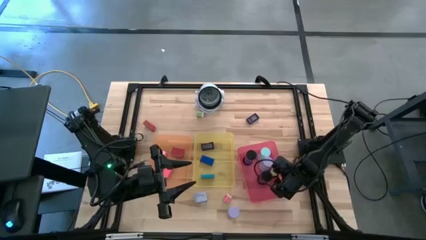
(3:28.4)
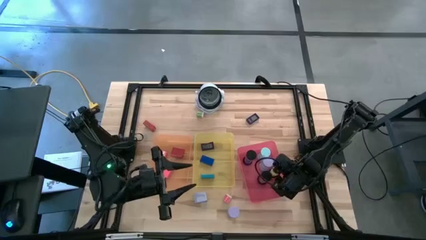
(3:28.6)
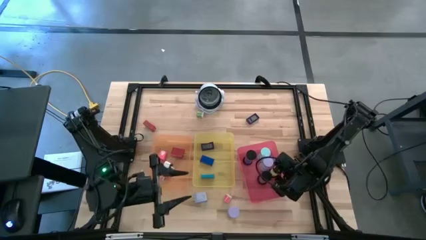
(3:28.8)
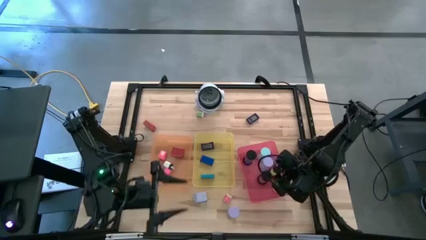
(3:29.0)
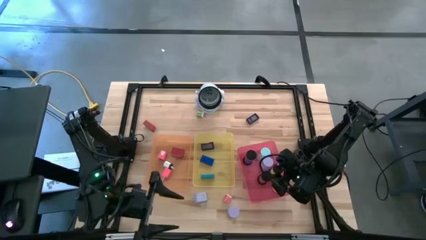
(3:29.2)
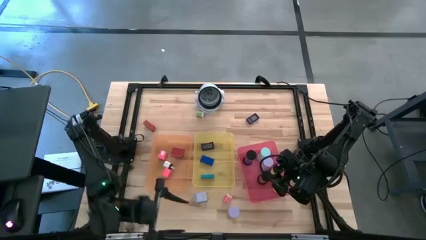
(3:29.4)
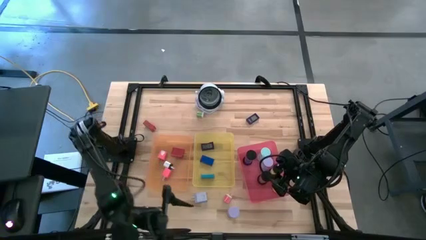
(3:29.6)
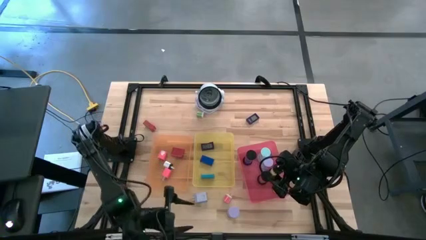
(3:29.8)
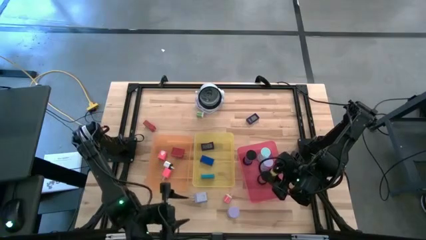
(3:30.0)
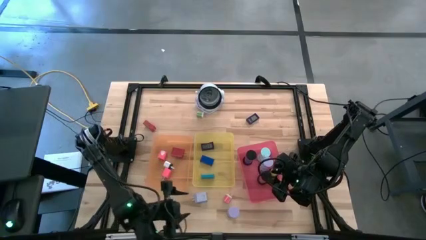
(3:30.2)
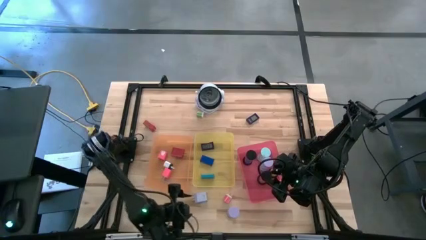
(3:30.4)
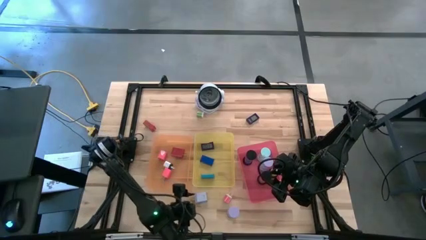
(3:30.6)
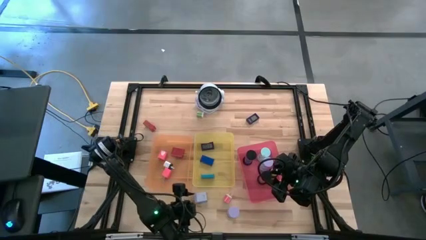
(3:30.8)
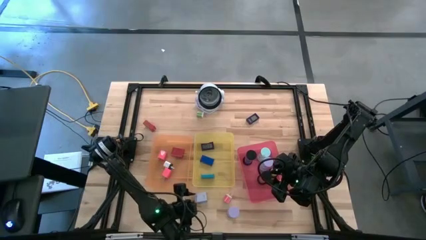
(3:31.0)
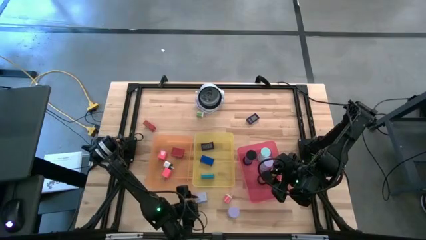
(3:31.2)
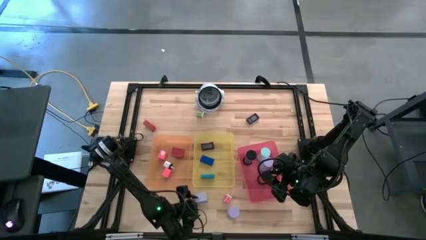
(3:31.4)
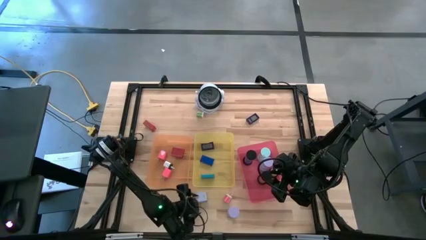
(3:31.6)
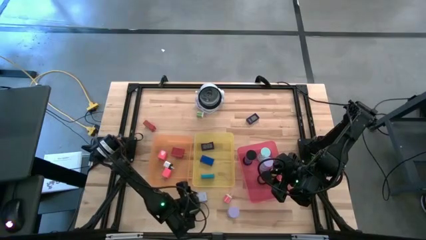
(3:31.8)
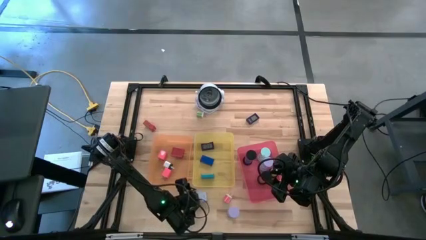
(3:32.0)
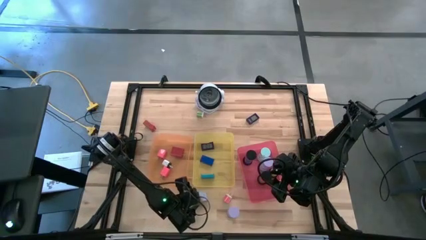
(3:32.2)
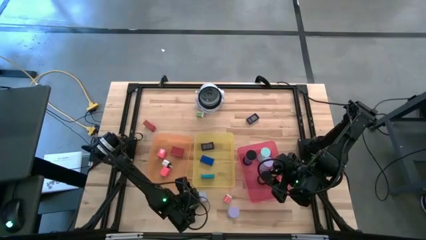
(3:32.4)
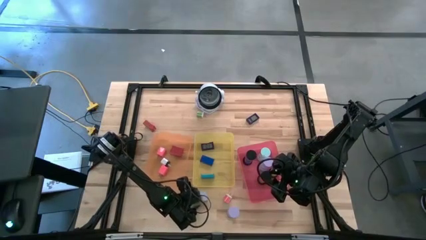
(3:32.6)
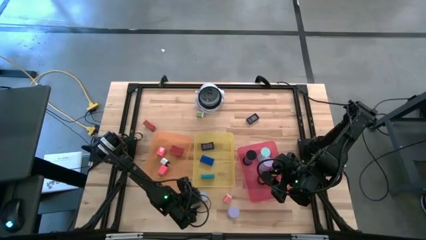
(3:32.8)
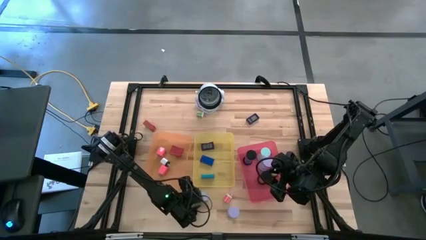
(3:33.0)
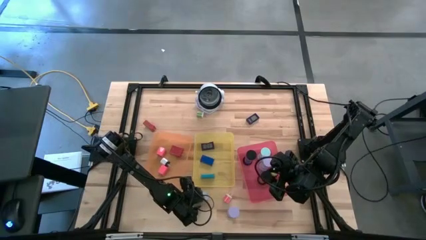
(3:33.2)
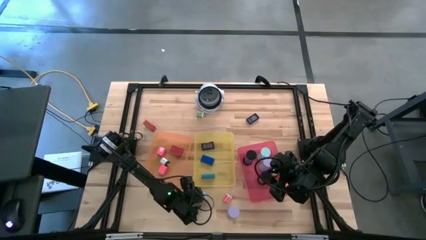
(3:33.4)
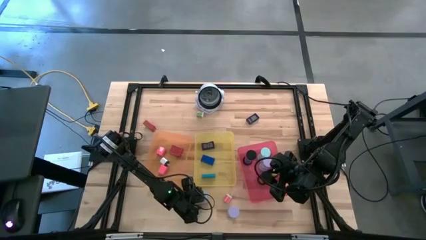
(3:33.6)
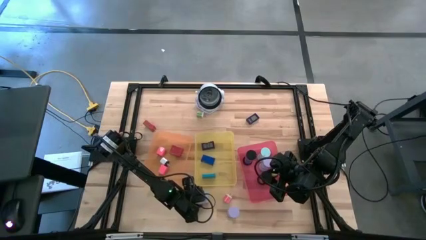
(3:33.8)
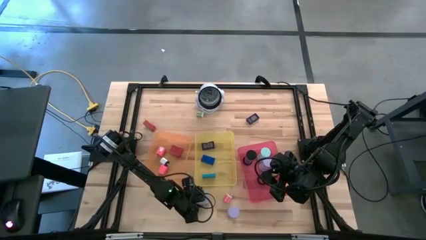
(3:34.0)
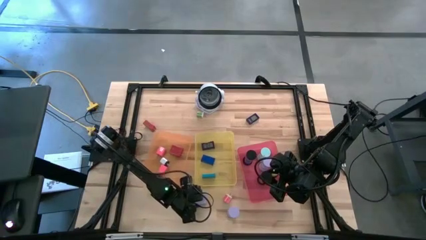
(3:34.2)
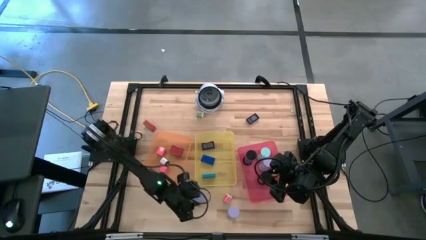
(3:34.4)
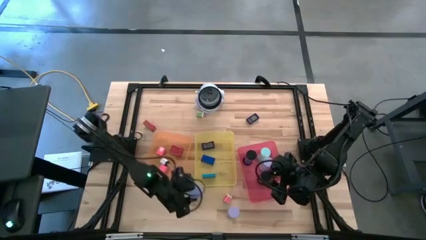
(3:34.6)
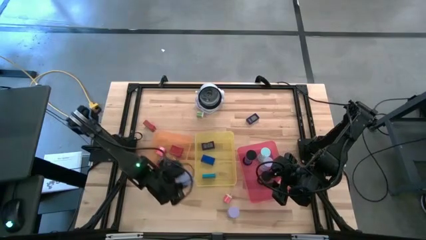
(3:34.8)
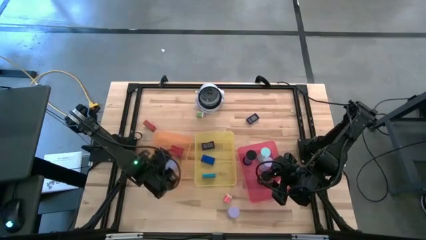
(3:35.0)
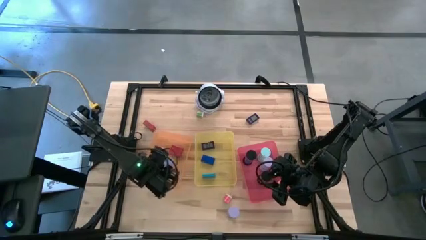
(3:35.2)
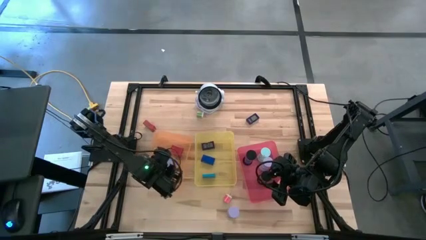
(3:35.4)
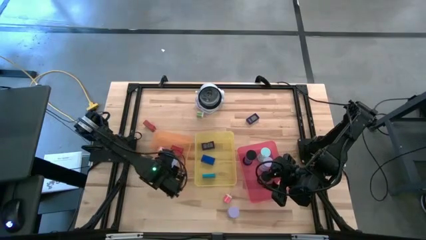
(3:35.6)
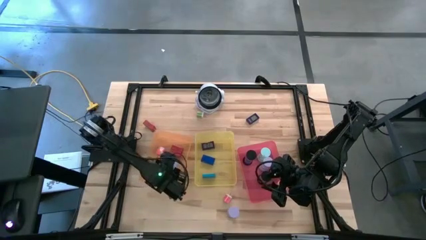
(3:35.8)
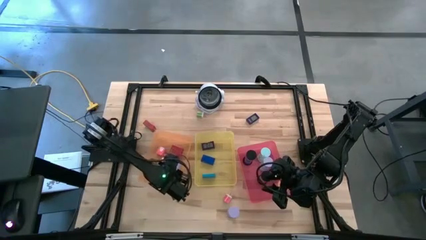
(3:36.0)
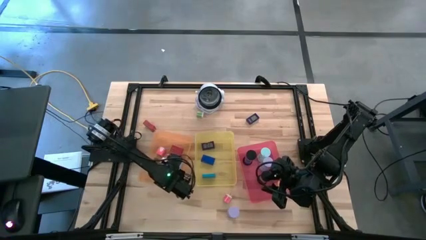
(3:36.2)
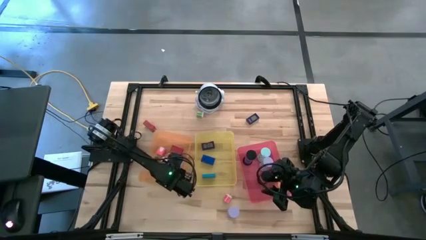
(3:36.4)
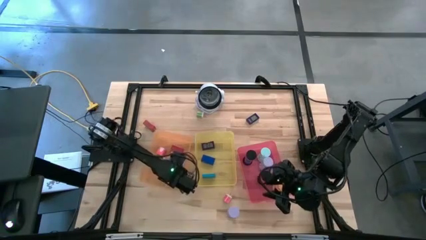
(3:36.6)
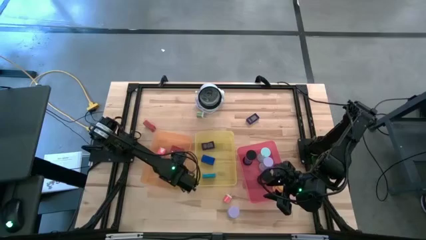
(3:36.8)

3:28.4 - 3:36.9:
Task: Pick & Place Office items
Put the white charger adaptor into the orange bin

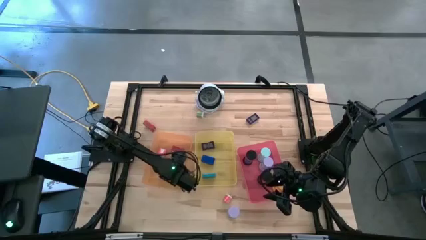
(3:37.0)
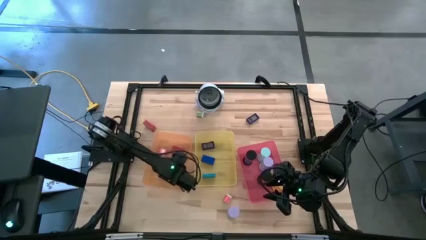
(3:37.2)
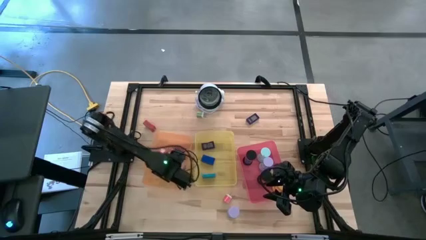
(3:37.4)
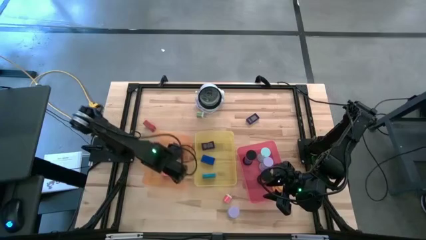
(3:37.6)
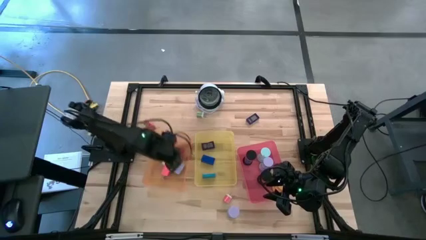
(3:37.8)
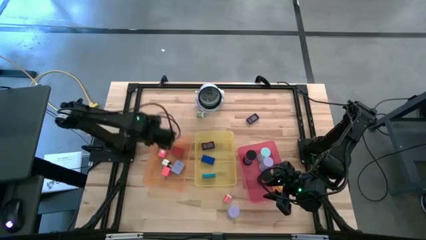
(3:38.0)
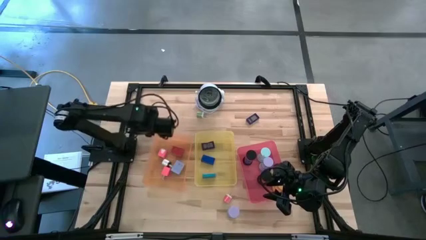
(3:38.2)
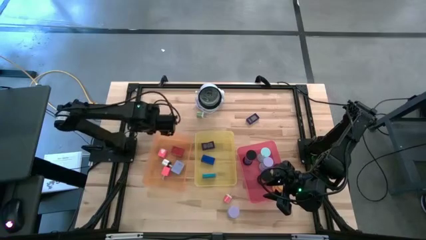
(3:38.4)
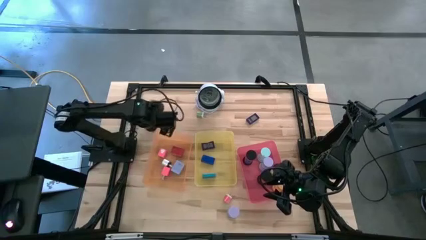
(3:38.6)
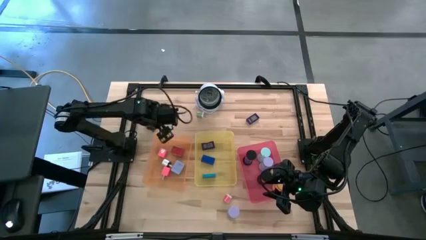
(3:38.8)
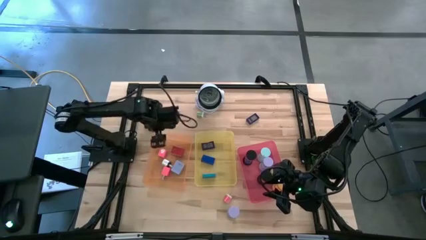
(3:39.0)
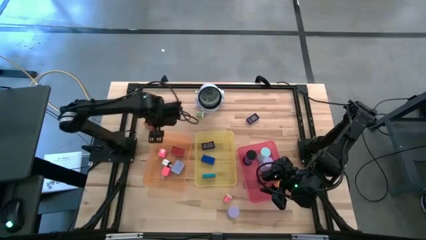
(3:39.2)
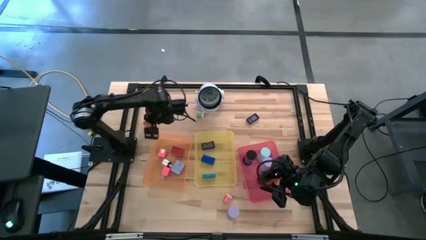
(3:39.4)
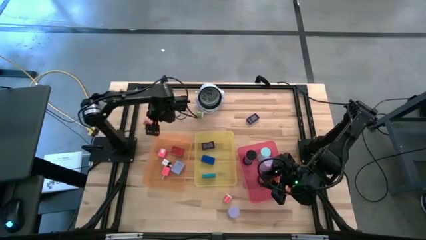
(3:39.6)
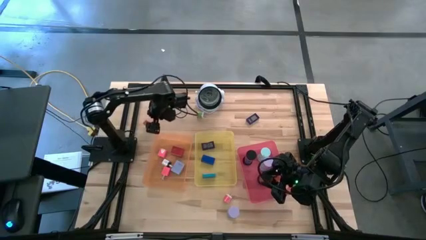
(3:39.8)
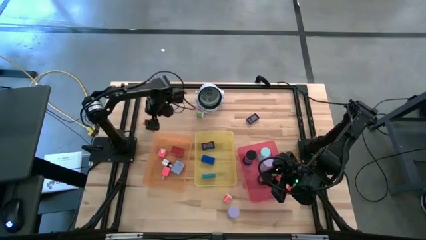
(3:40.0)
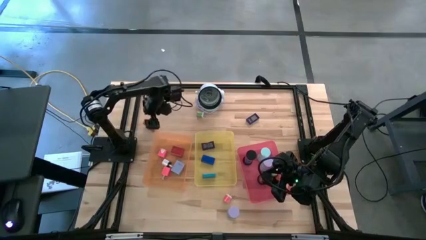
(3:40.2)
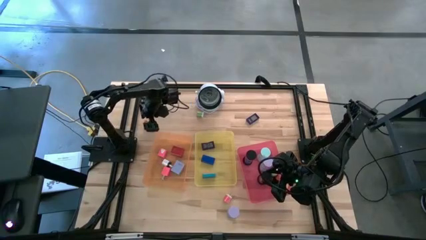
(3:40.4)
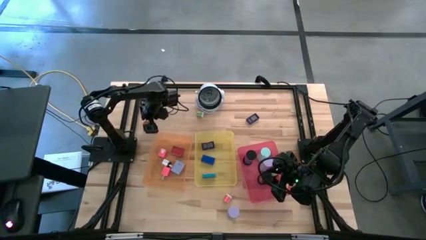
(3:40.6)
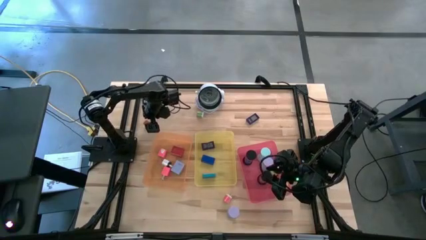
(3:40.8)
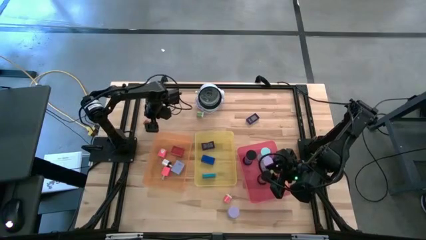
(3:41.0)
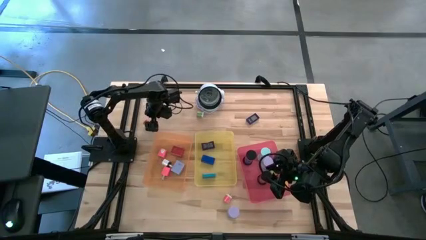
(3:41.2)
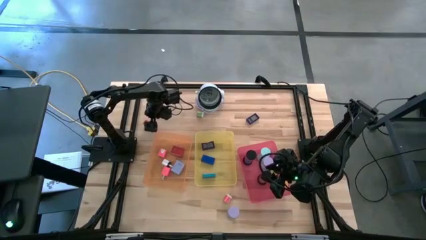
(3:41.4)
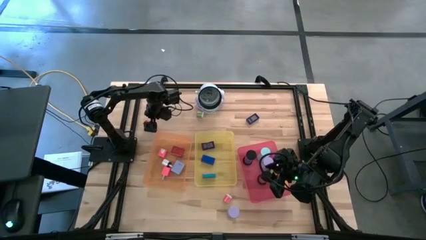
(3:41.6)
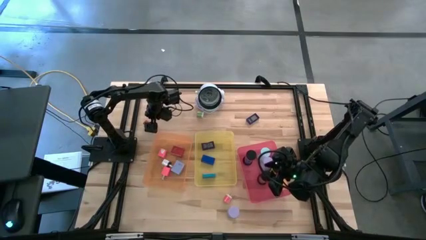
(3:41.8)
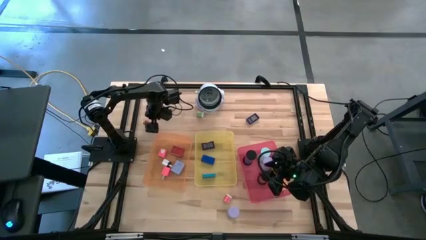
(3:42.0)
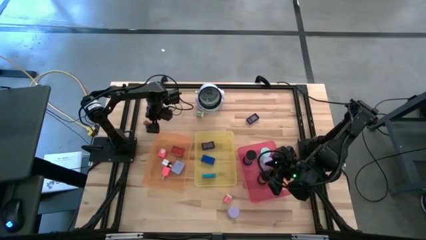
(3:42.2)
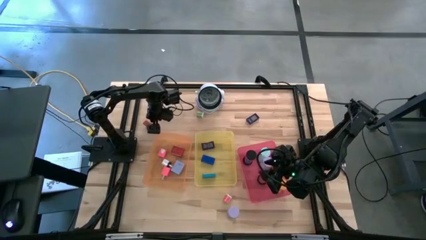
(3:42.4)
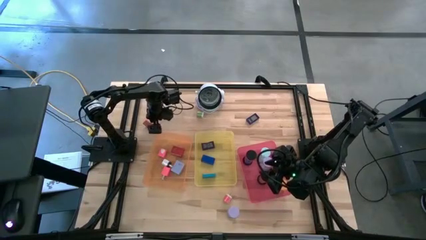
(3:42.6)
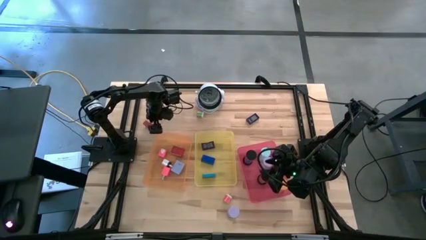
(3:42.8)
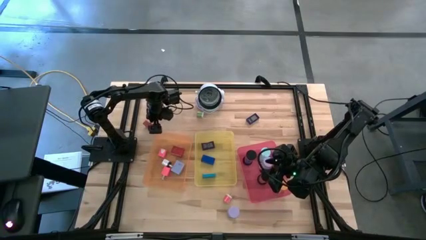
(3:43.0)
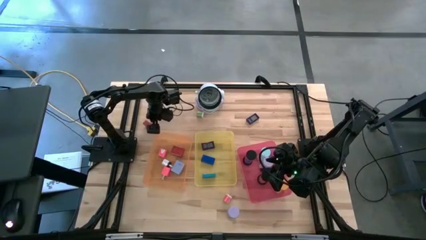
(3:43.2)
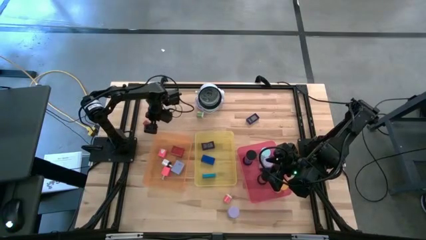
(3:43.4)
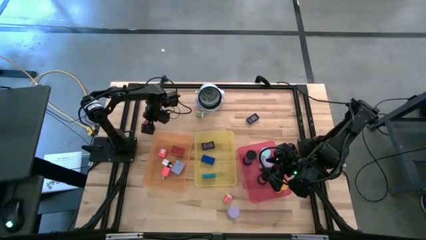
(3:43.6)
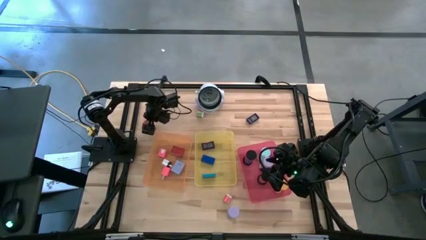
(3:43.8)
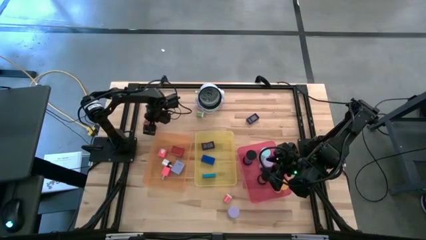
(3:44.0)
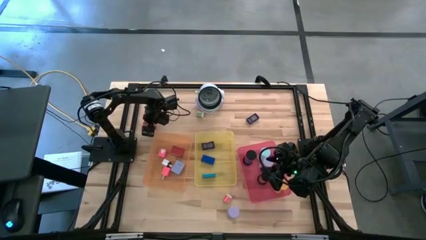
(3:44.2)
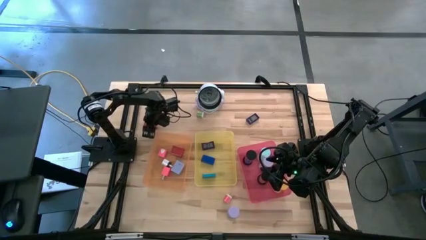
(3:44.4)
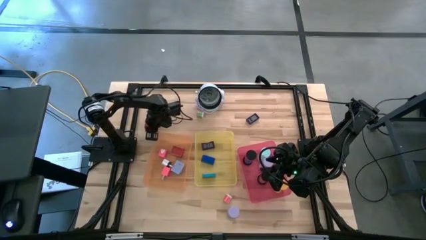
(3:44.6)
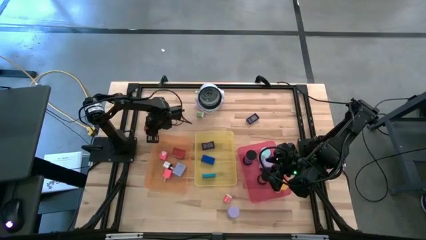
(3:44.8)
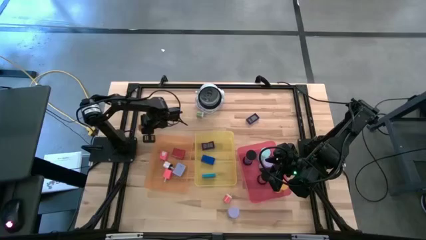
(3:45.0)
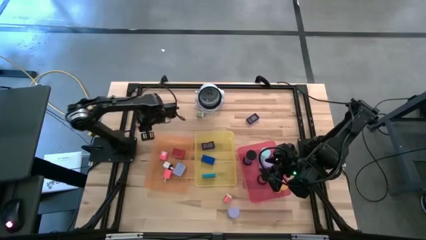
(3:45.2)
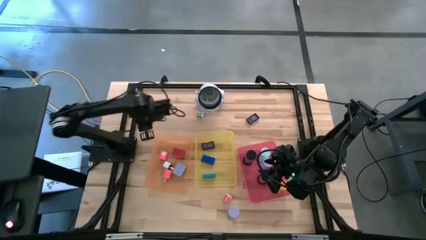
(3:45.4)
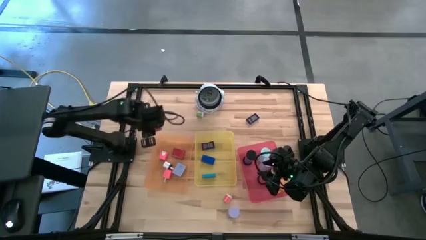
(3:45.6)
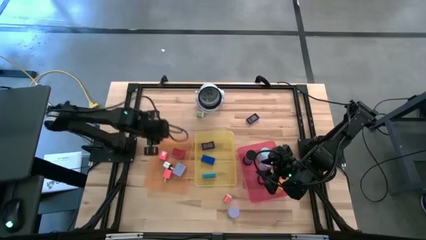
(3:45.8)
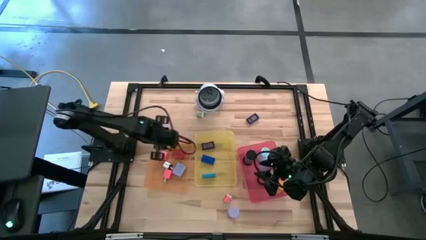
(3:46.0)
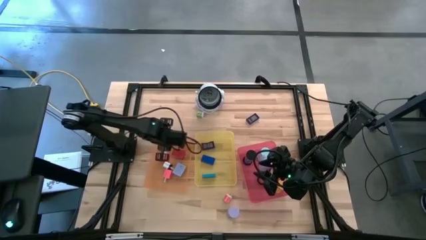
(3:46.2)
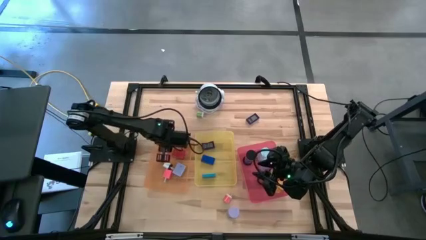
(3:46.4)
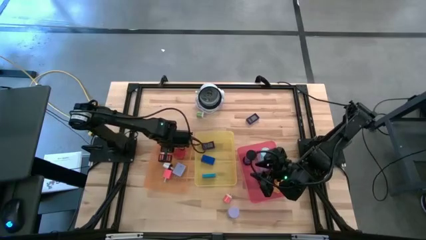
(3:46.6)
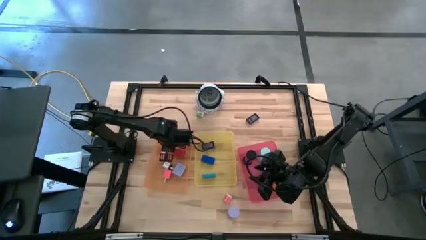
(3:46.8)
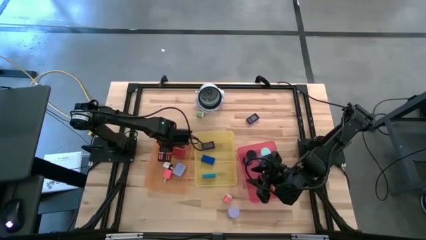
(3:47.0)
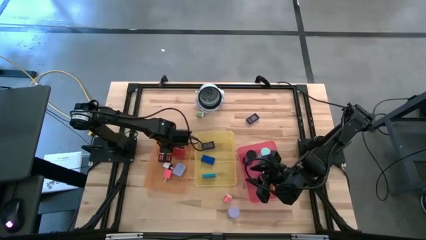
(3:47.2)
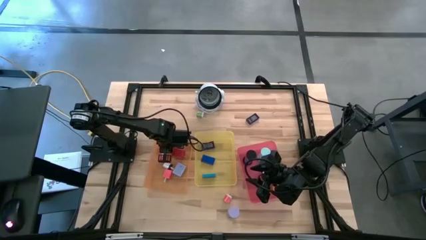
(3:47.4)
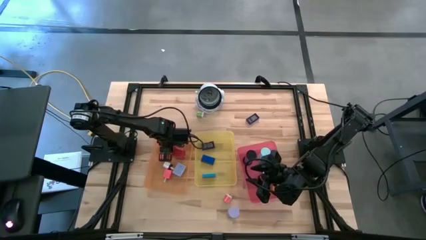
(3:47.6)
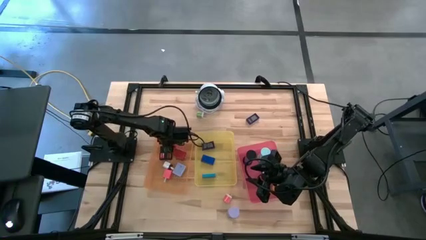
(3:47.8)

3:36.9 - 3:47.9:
Put the red charger adaptor into the orange bin
